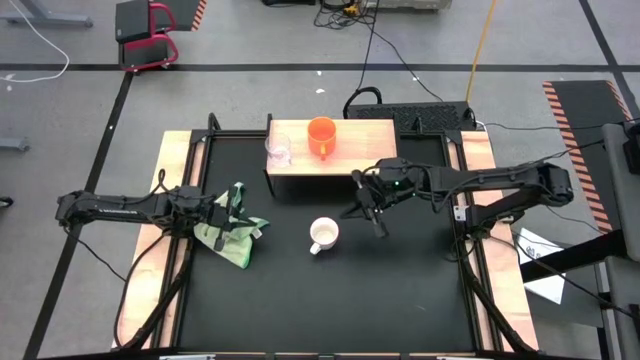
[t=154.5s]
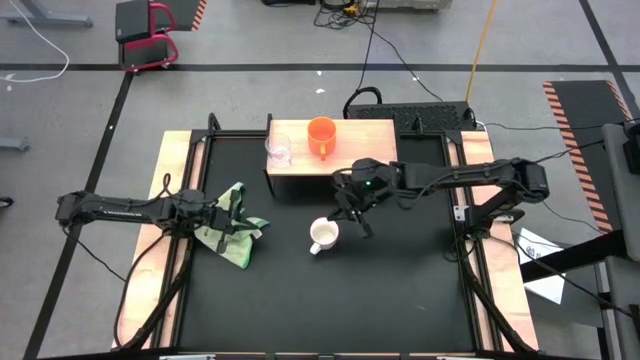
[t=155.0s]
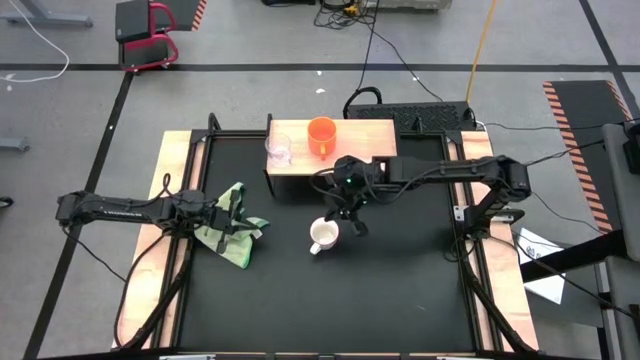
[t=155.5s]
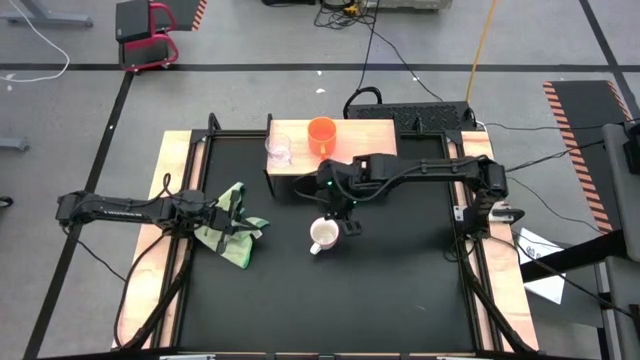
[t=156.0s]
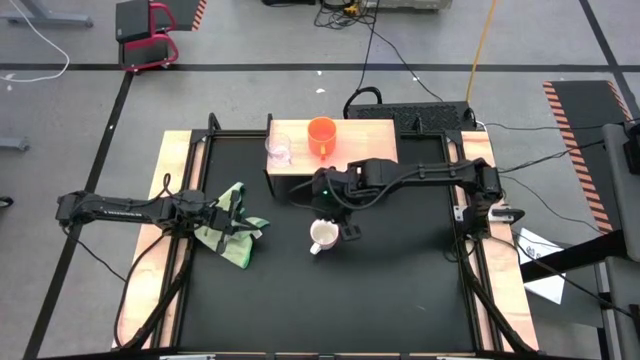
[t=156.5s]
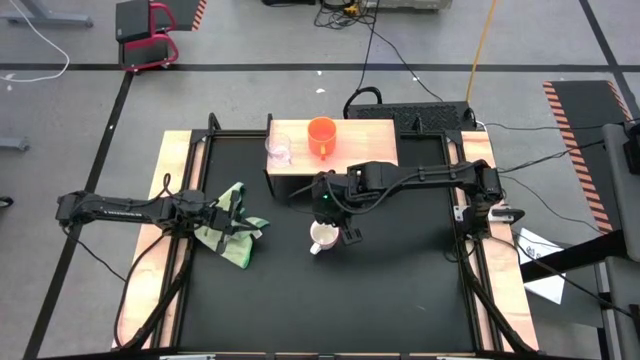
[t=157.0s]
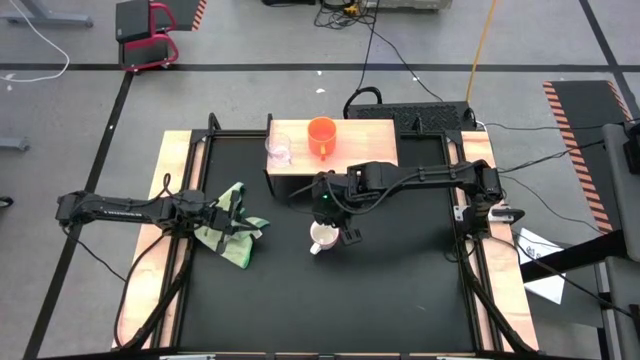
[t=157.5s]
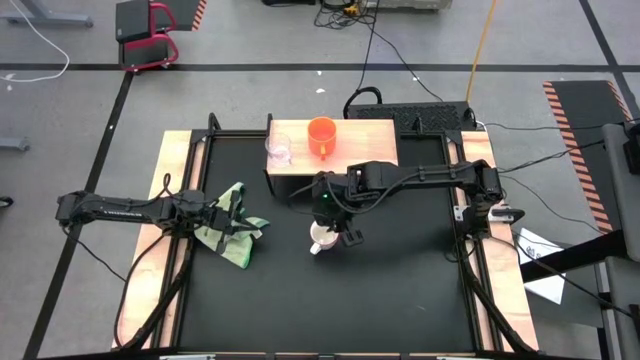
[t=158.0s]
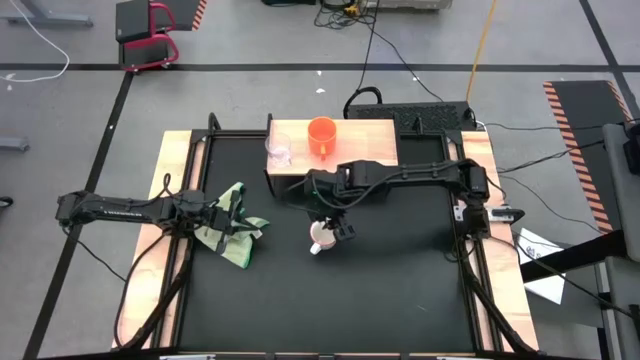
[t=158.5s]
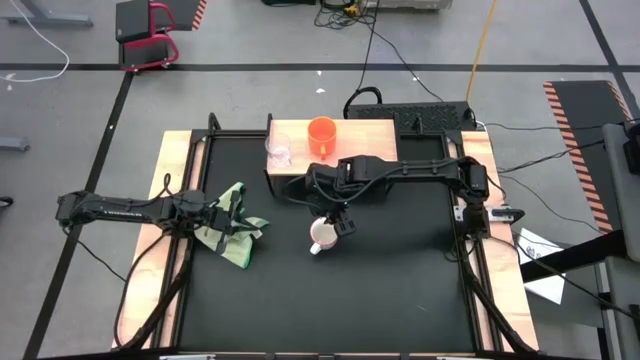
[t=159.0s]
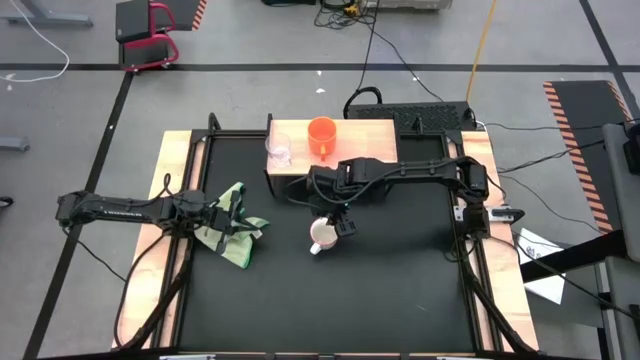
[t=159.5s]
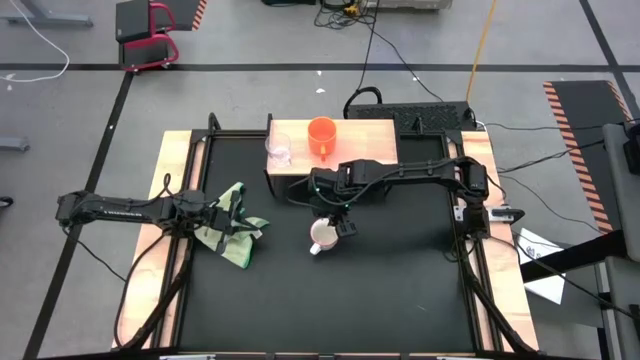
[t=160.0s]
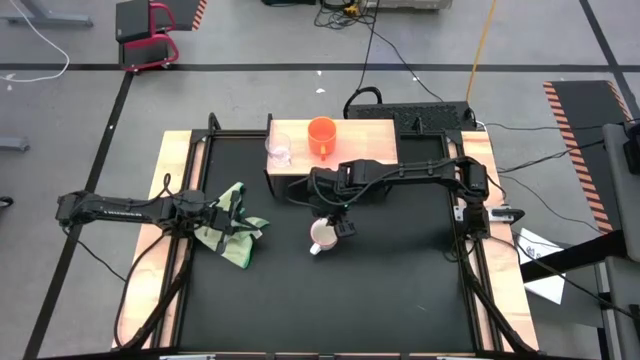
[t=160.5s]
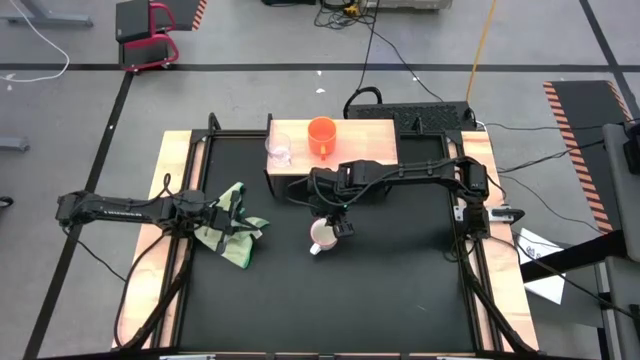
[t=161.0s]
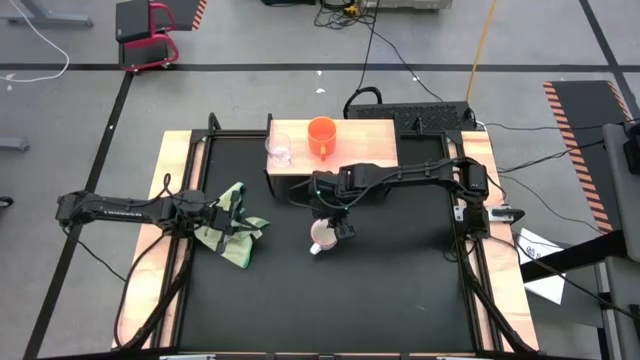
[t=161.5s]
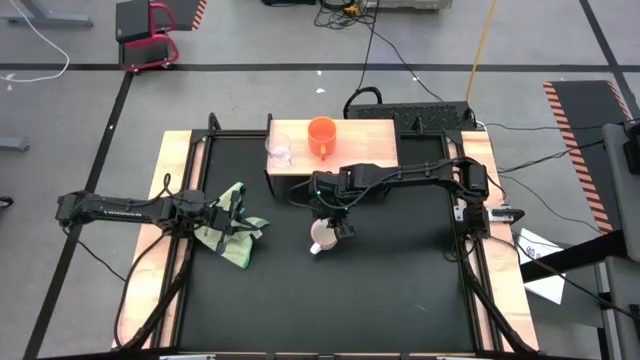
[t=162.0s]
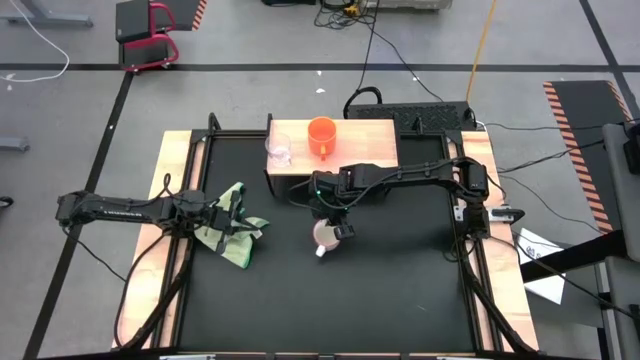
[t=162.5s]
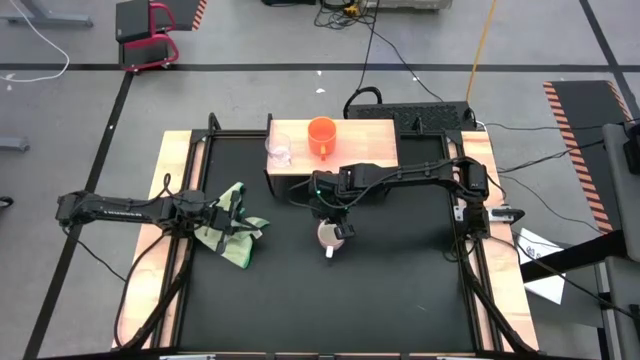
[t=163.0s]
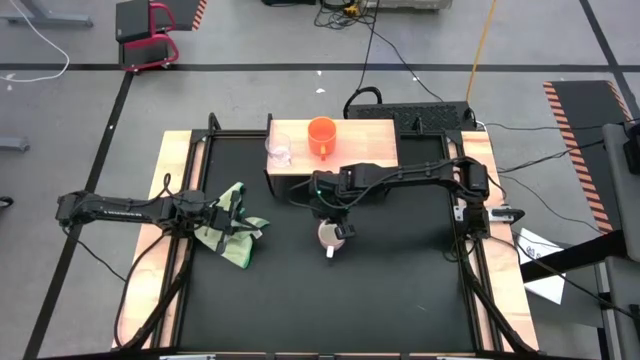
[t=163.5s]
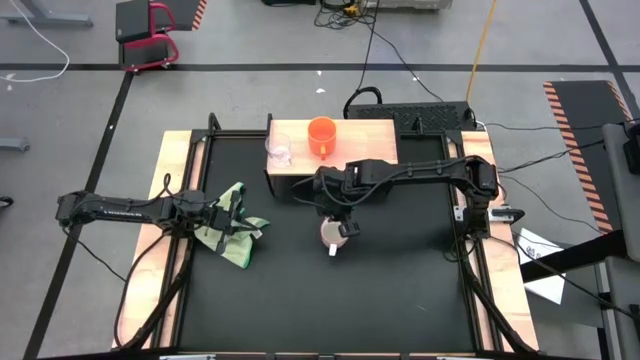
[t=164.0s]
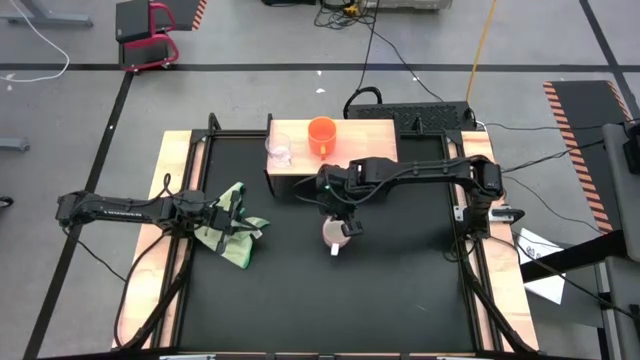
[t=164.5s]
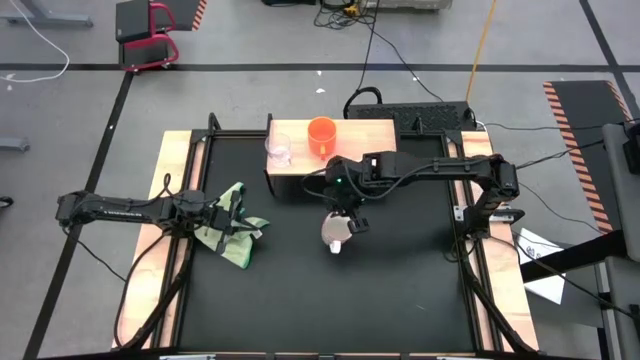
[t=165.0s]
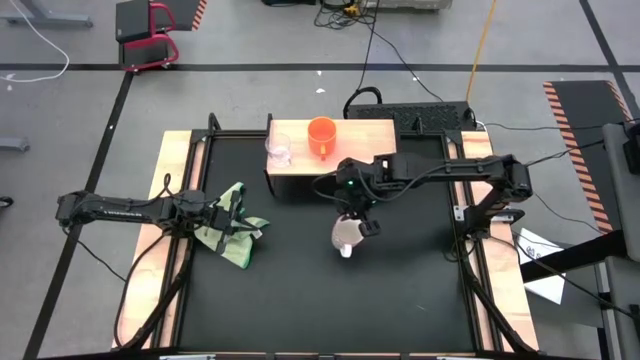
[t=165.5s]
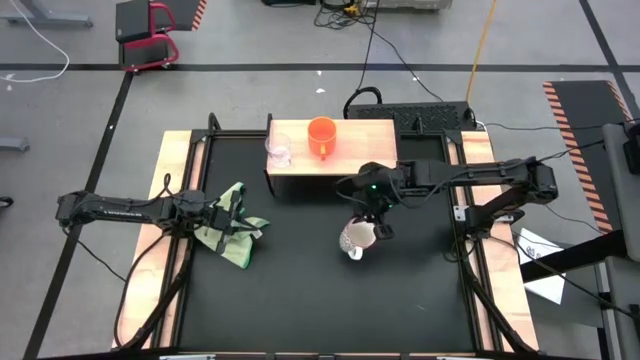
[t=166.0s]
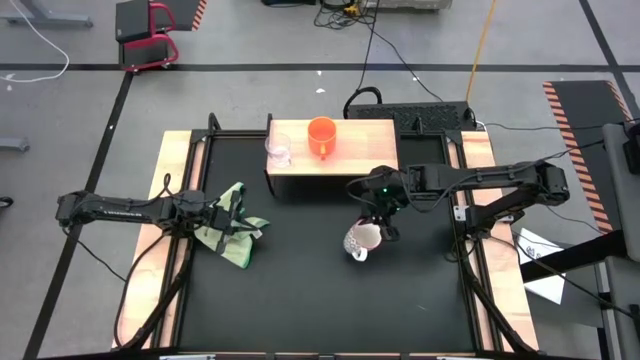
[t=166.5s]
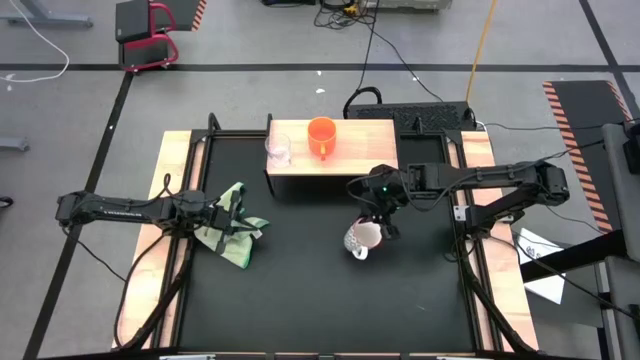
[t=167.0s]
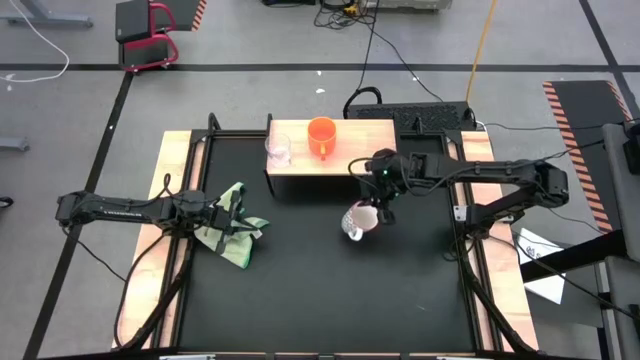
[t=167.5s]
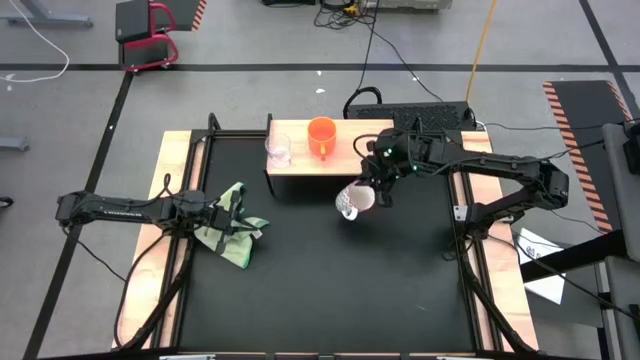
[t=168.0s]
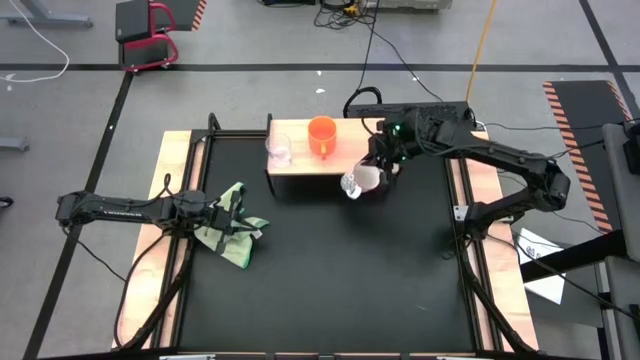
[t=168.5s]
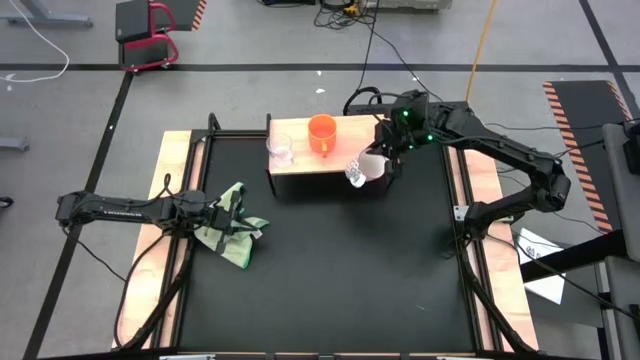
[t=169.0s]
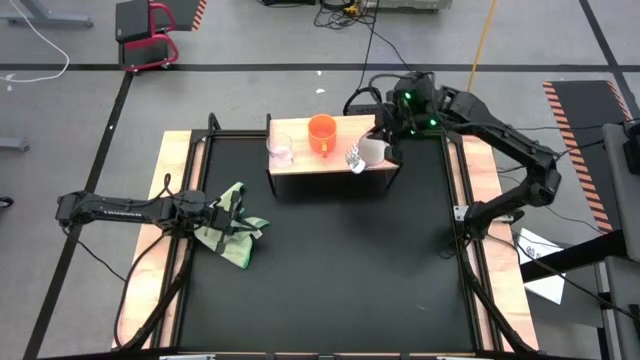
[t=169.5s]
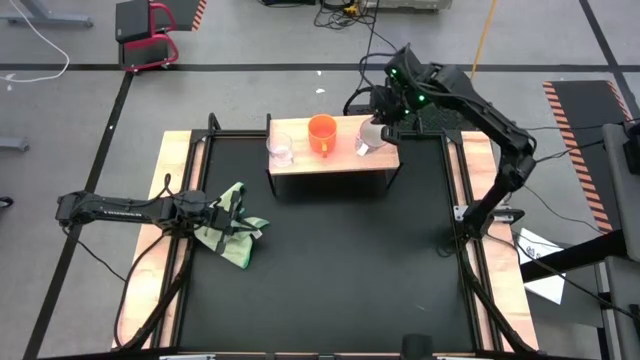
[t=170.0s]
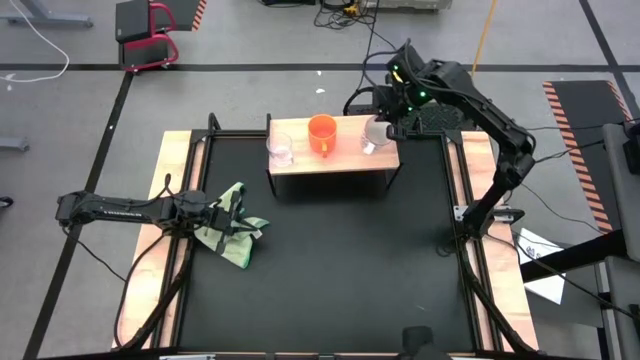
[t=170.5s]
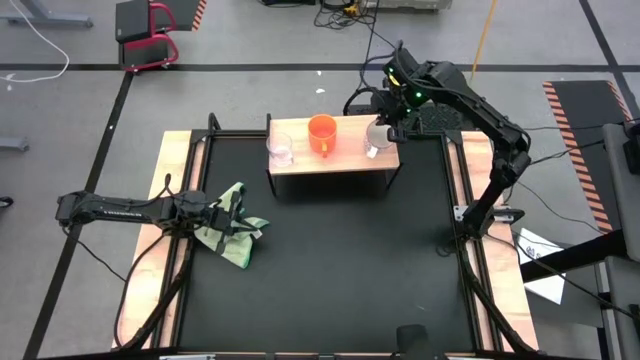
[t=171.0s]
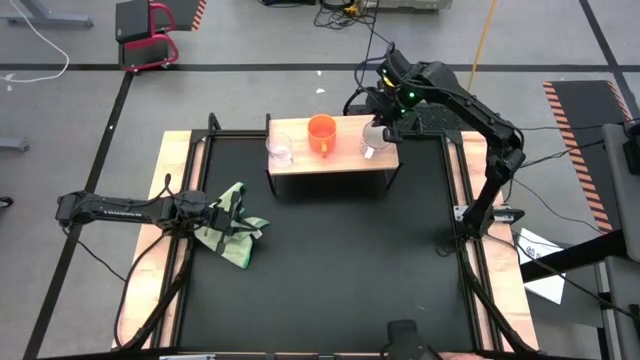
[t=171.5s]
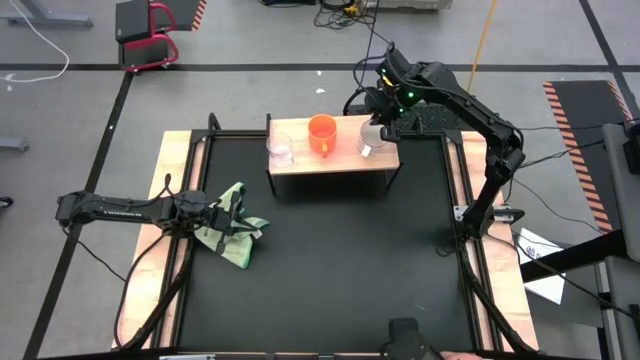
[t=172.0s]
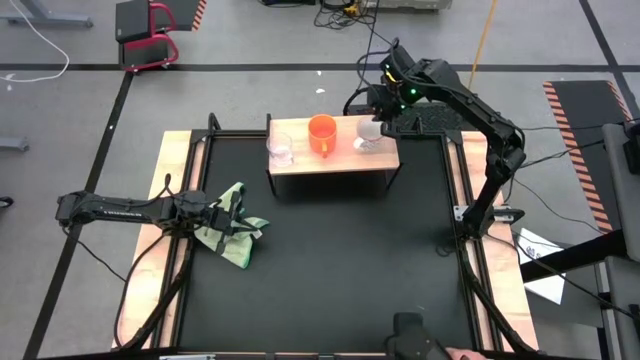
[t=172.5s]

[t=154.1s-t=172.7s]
Task: Stack small to large cups/mugs on shelf
Put the white patterned mug on the shelf

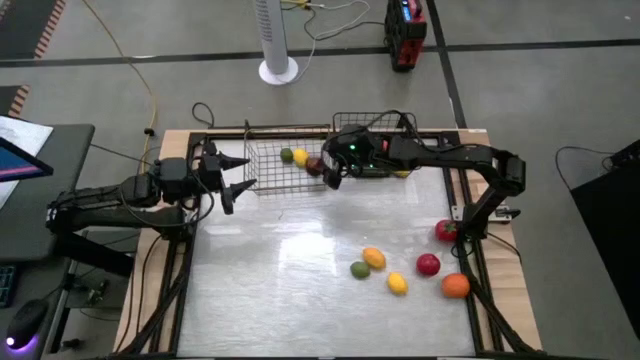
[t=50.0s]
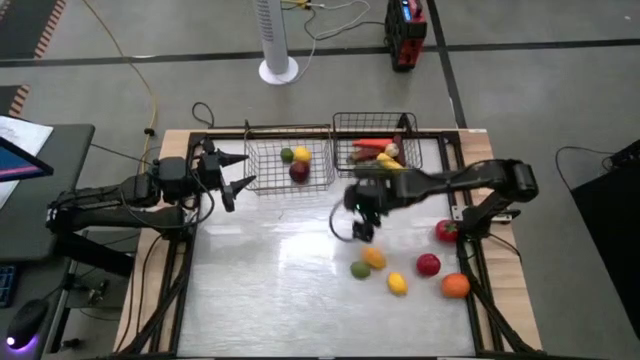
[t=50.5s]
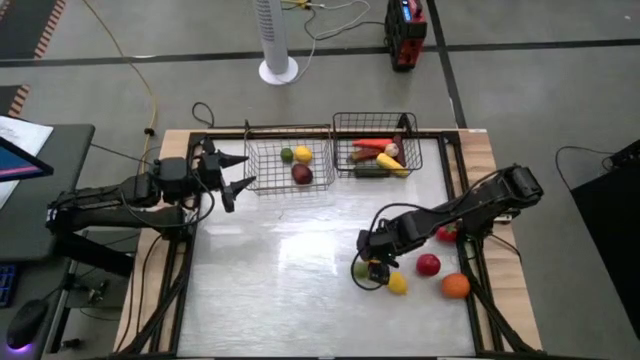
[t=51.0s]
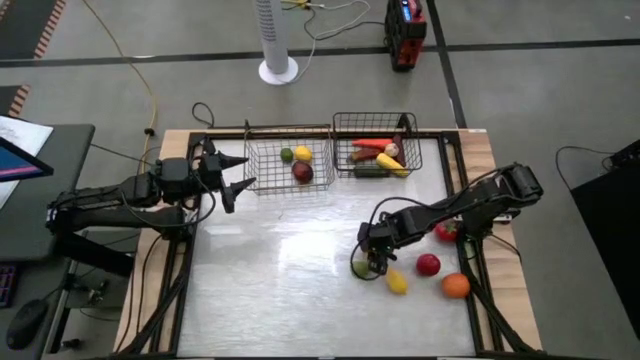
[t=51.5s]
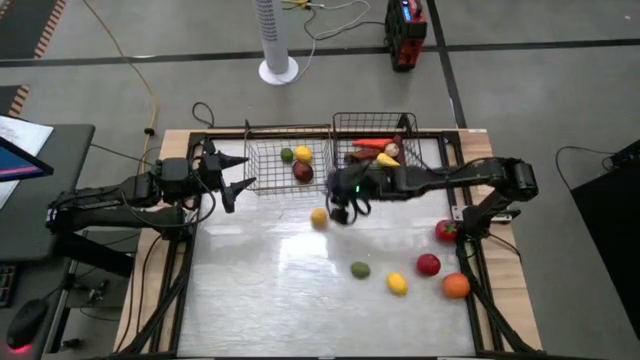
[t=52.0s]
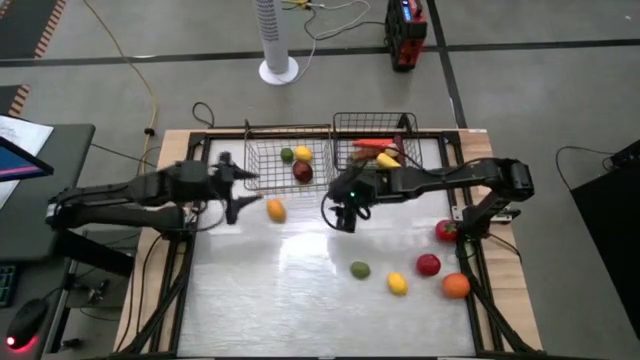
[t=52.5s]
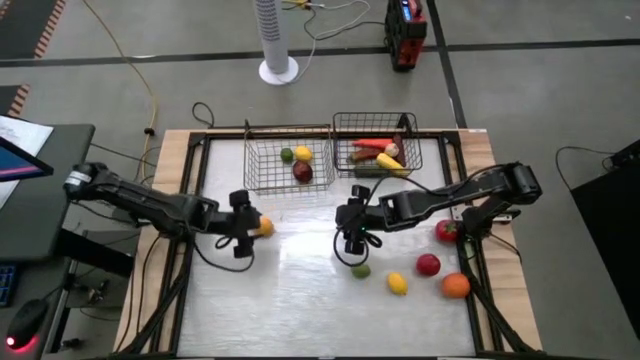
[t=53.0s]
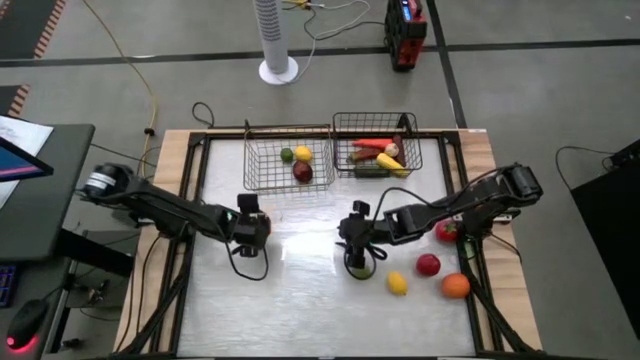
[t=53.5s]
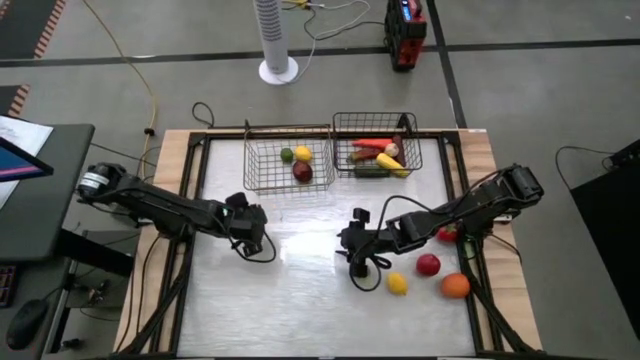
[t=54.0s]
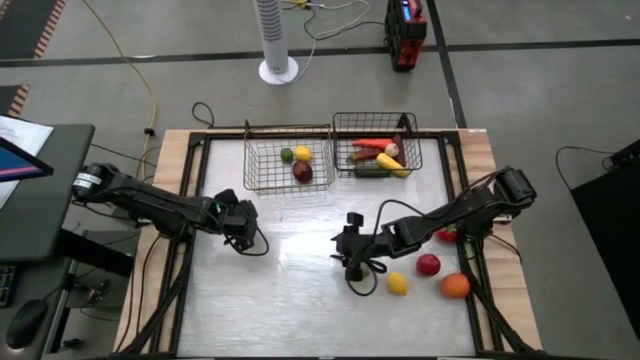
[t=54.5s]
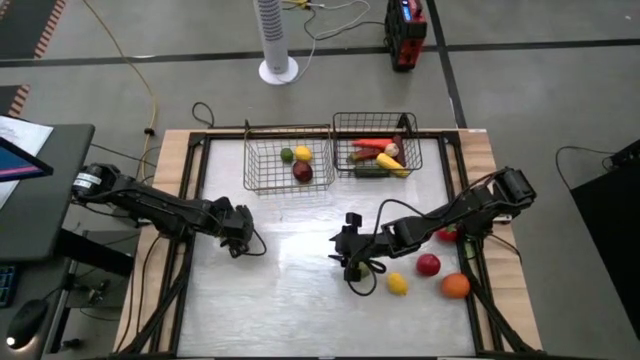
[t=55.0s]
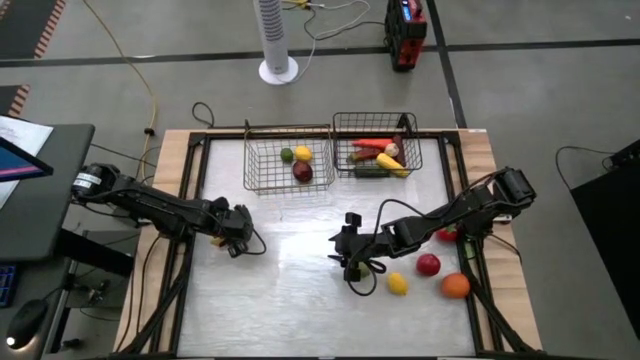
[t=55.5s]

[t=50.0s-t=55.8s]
Task: Sort produce into baskets
Put the lemon into the left wire basket
